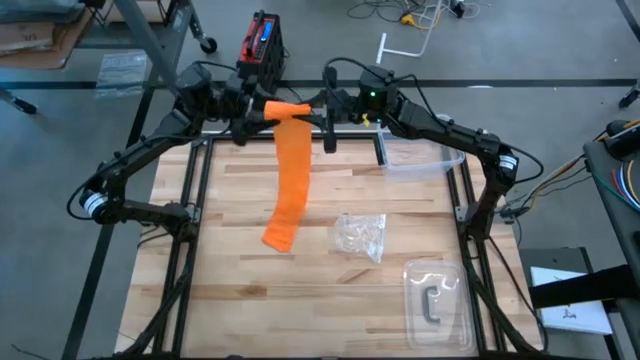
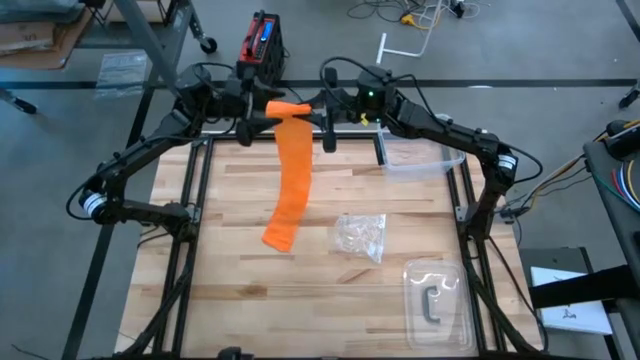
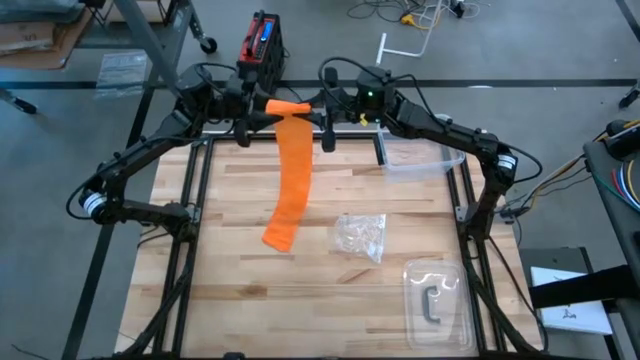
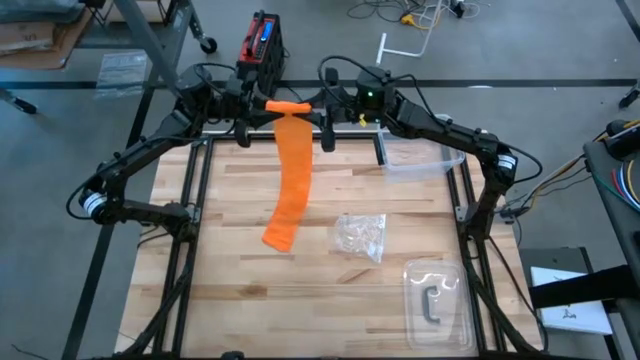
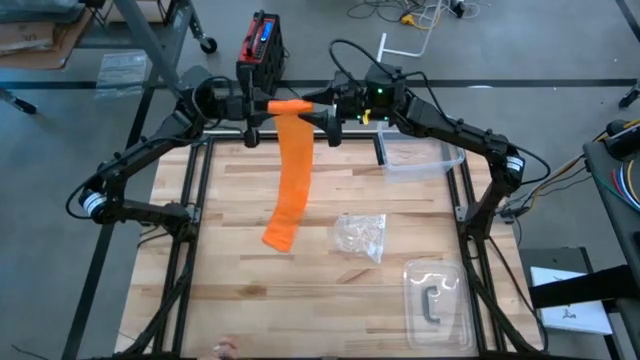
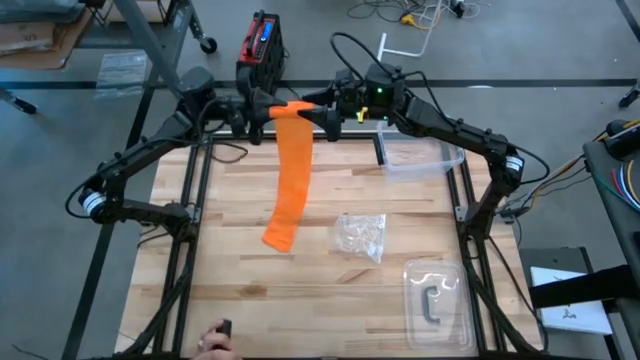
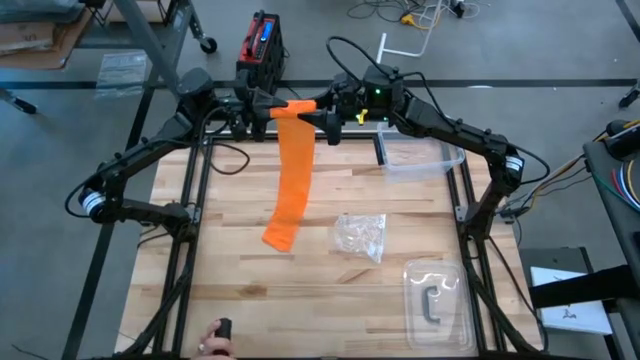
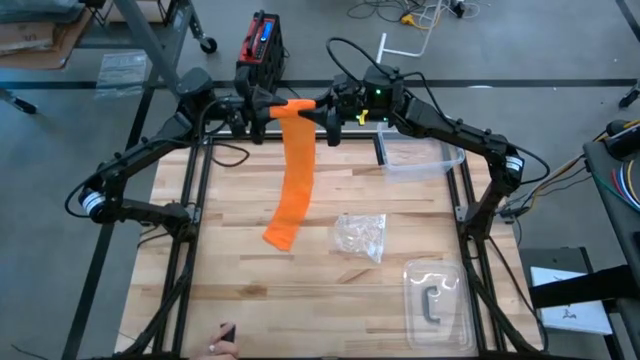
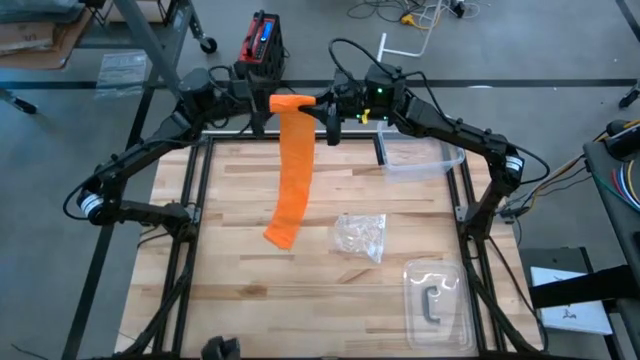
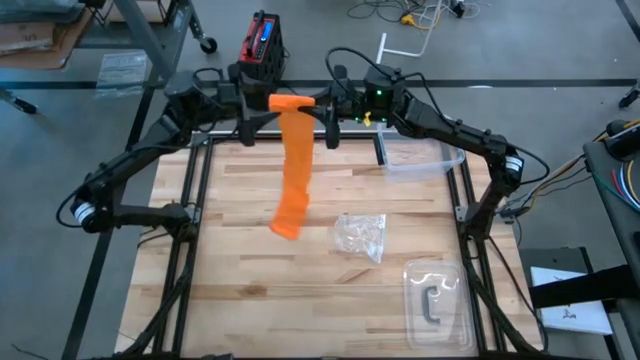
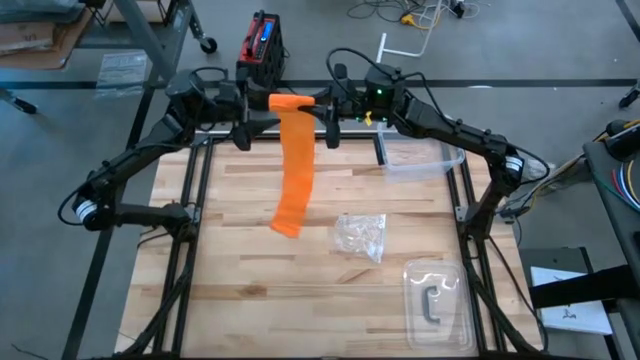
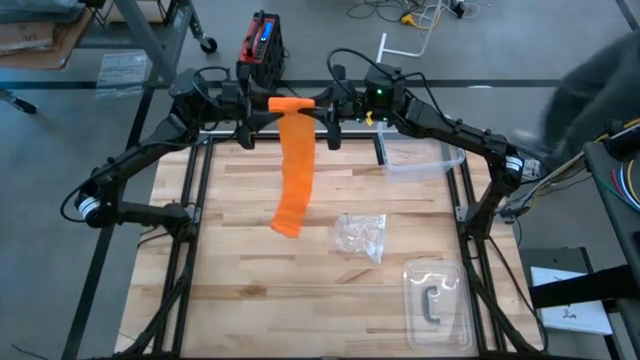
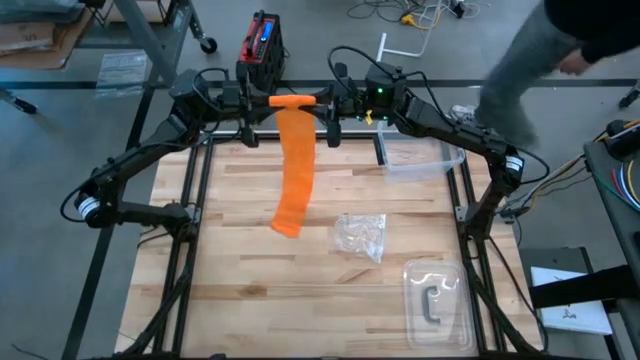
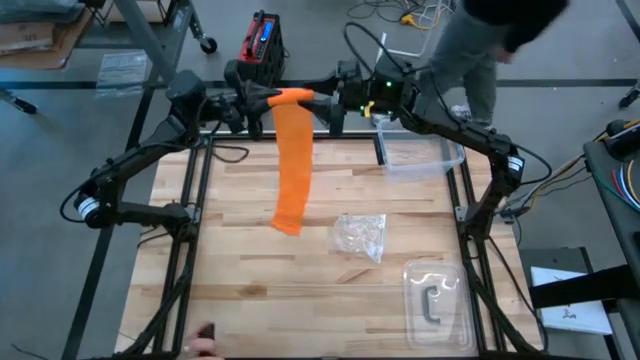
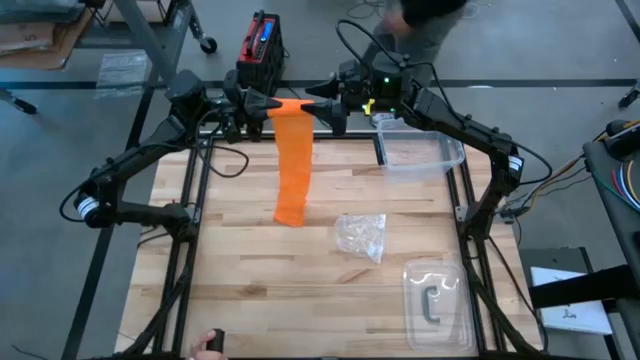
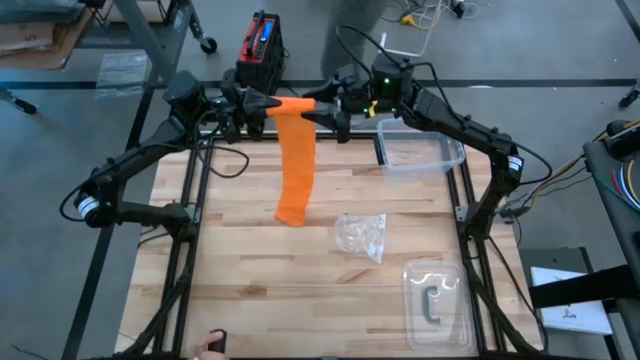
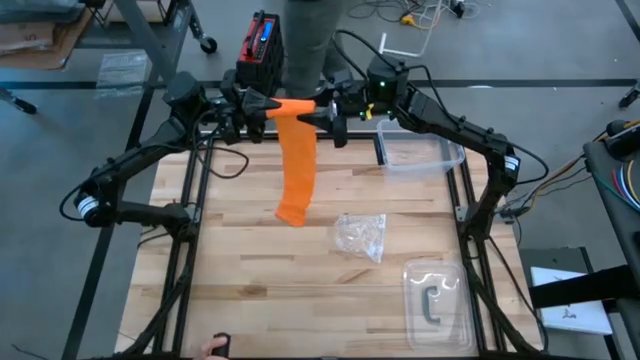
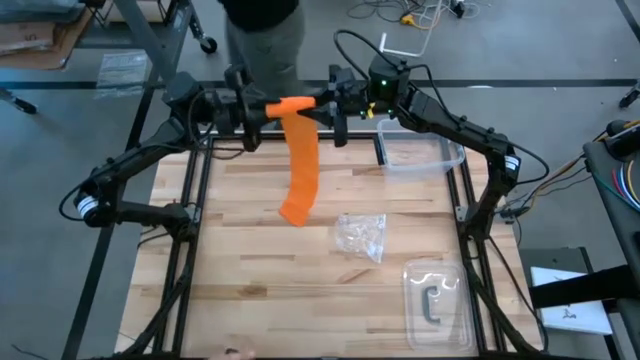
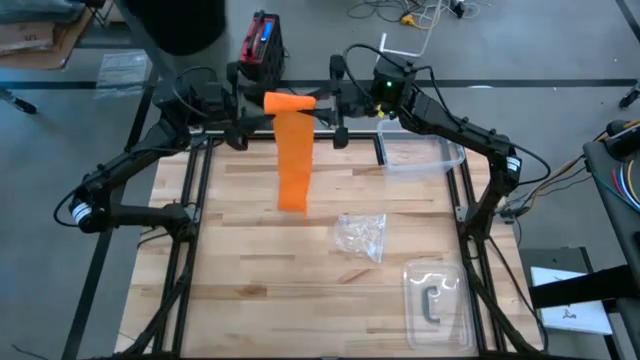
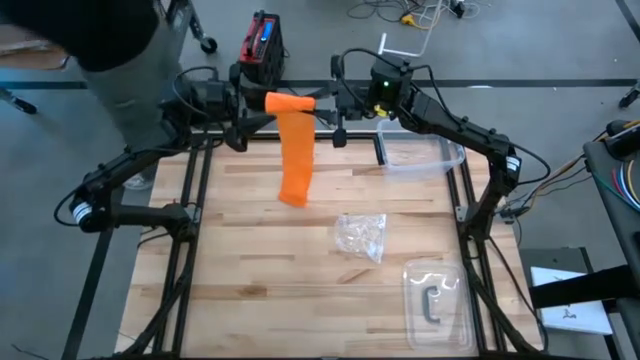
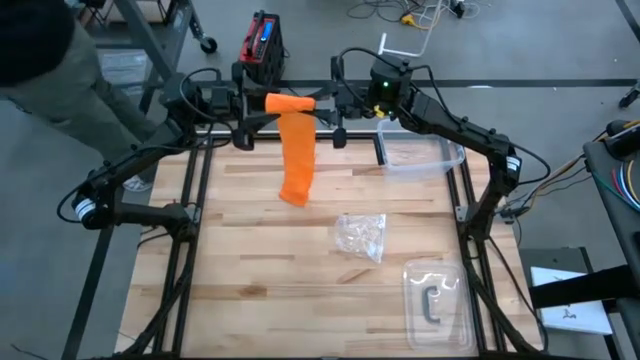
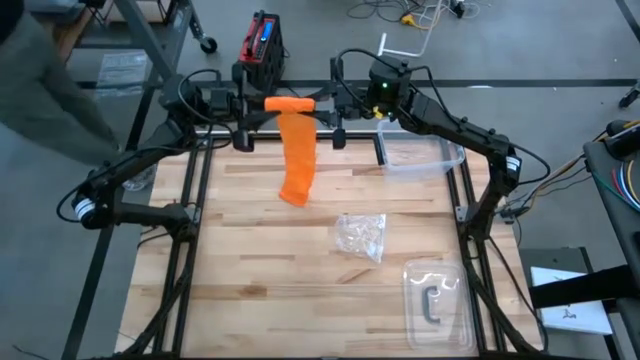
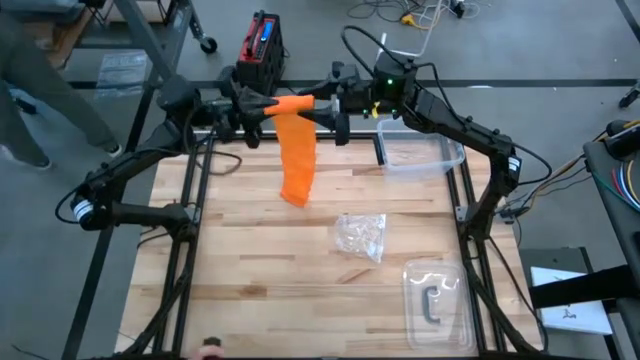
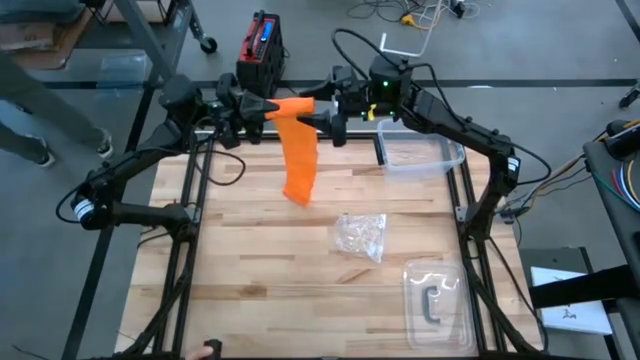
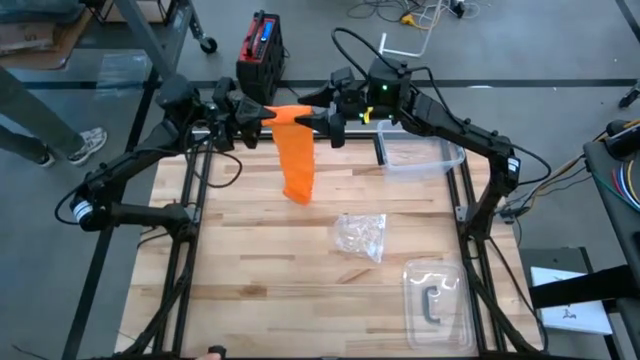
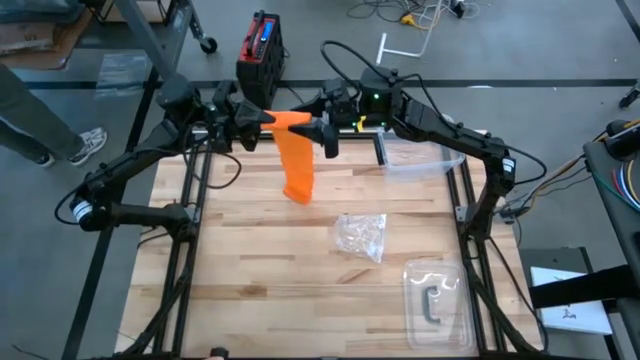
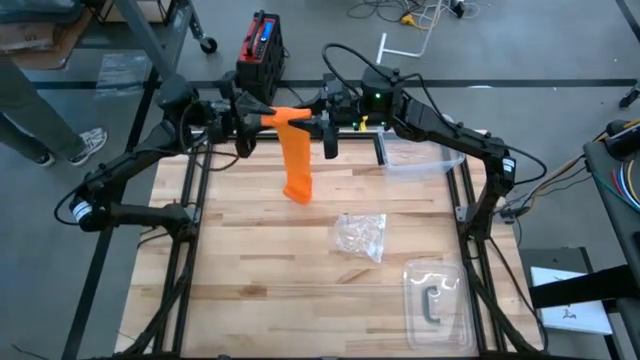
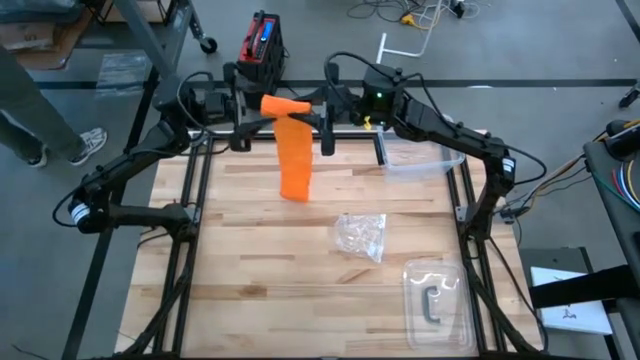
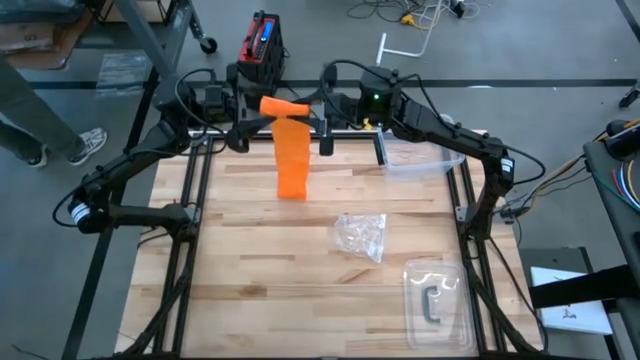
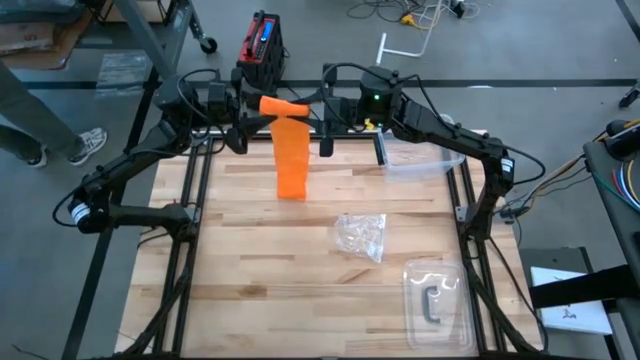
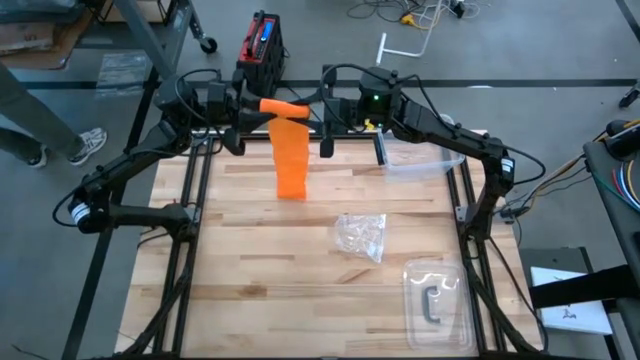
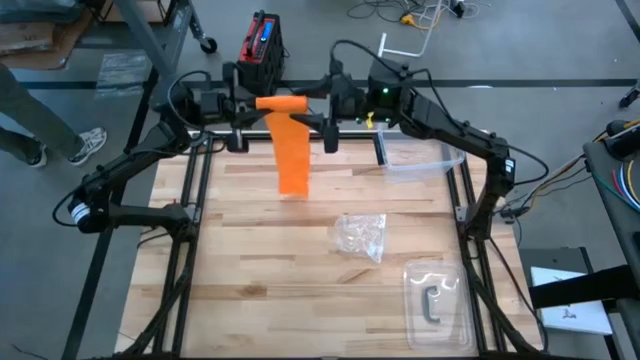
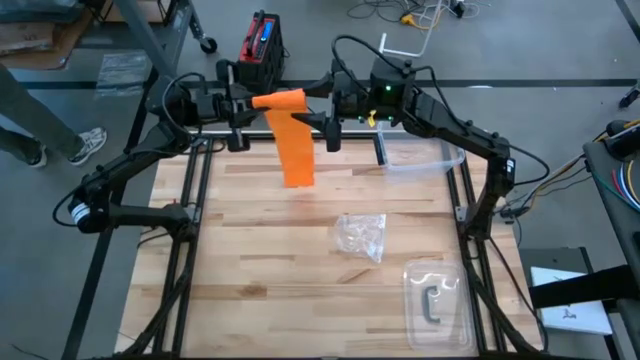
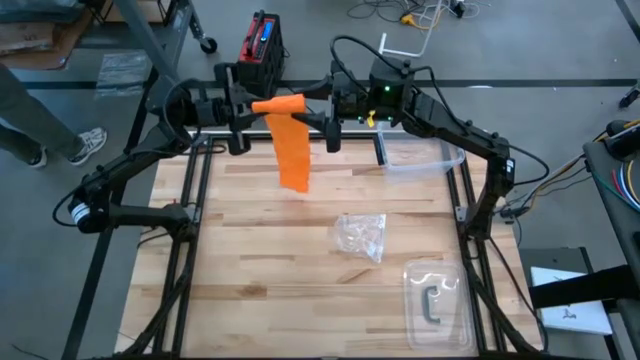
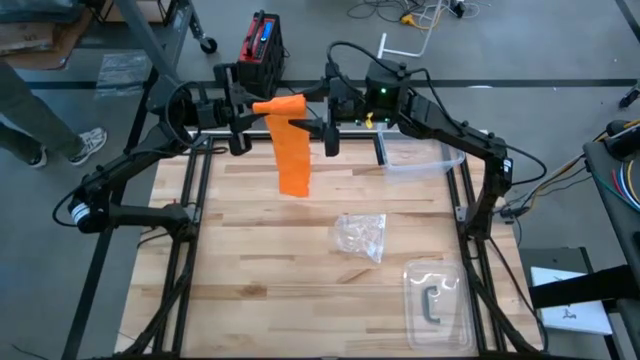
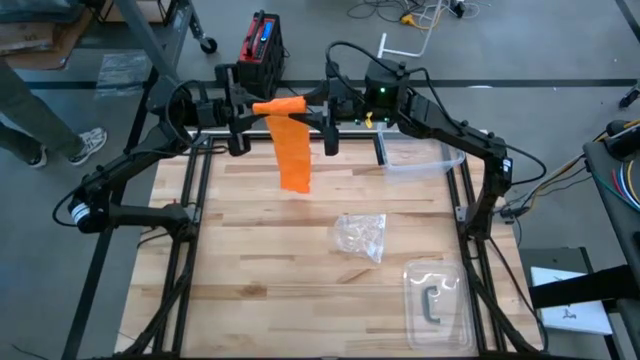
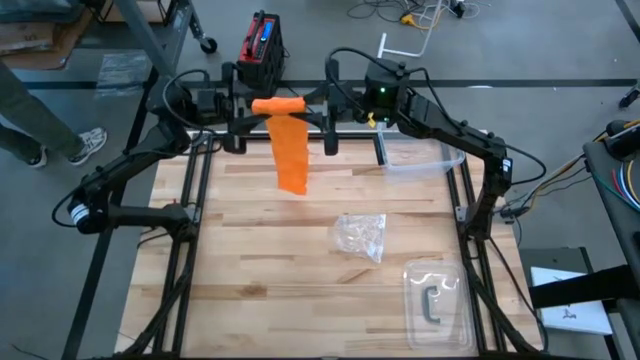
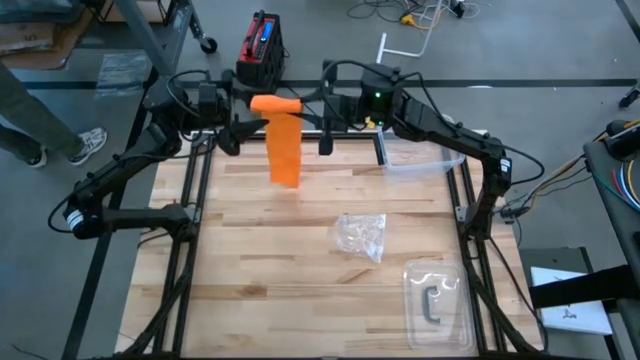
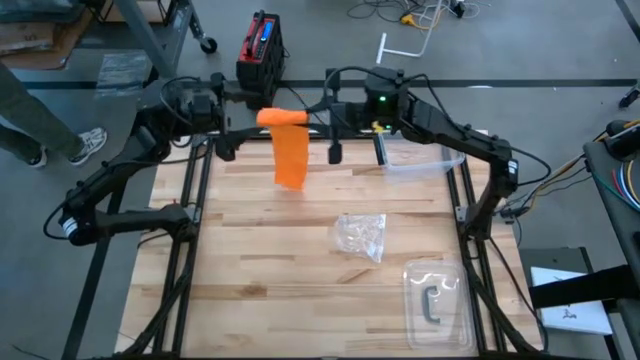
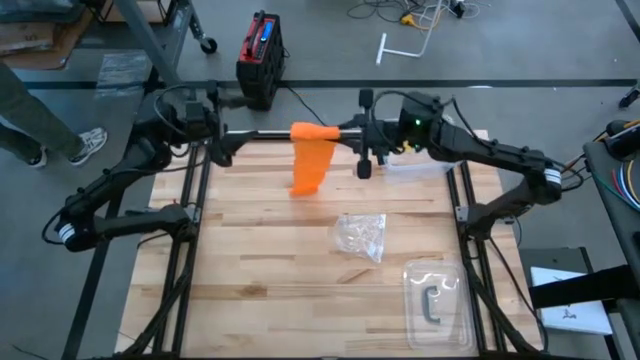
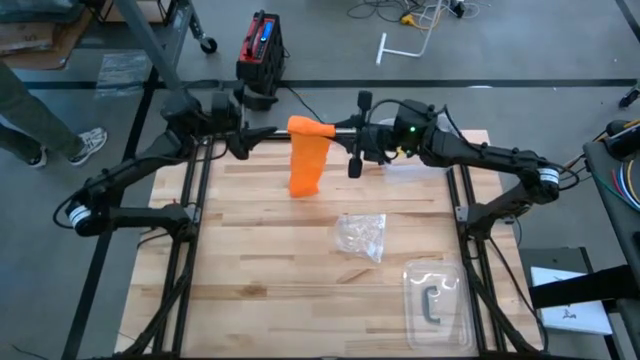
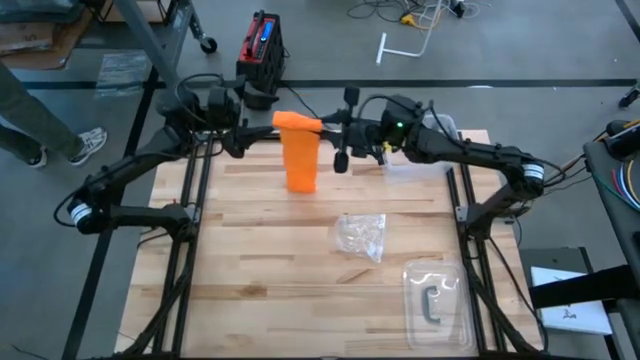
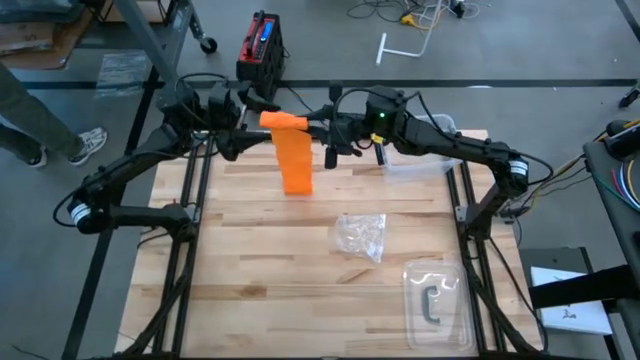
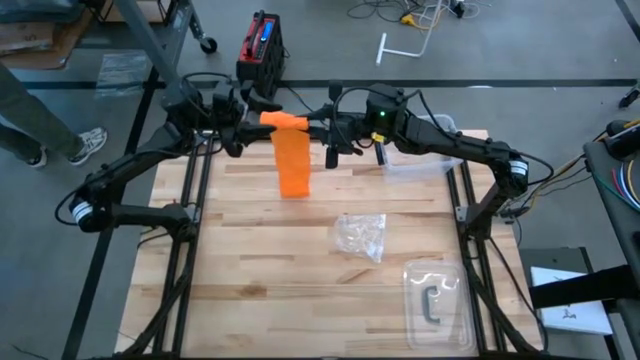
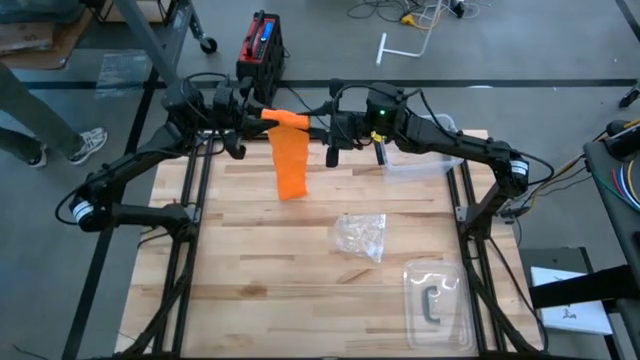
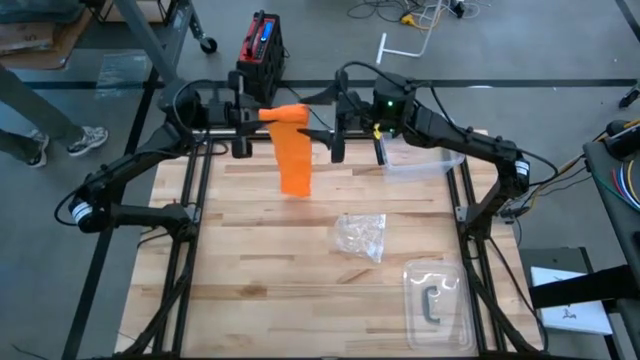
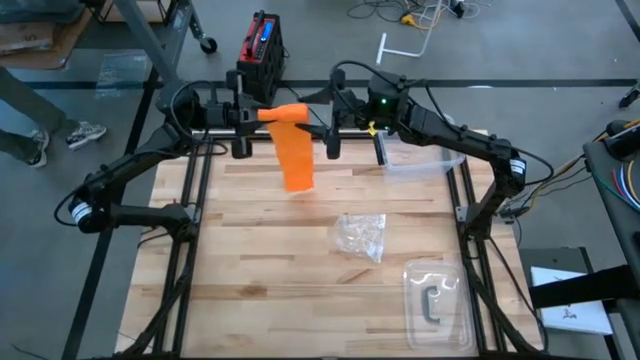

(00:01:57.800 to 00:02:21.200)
Task: Roll bandage
Roll the orange bandage
